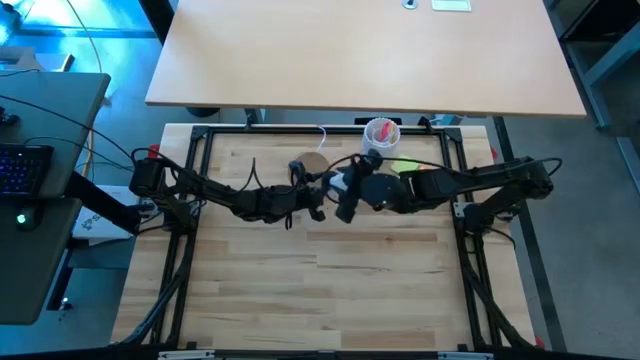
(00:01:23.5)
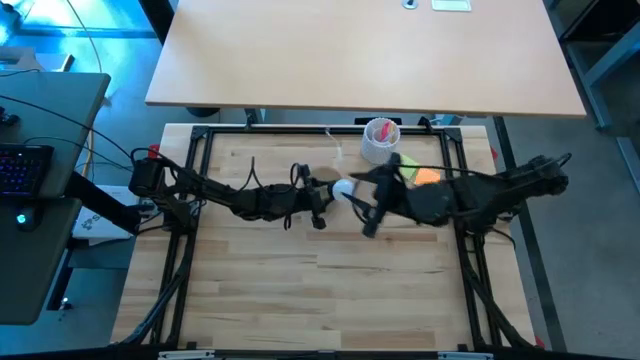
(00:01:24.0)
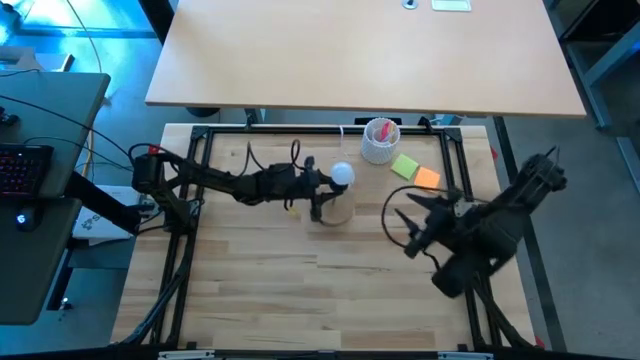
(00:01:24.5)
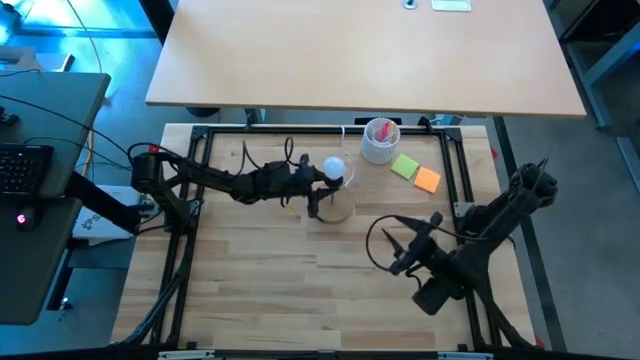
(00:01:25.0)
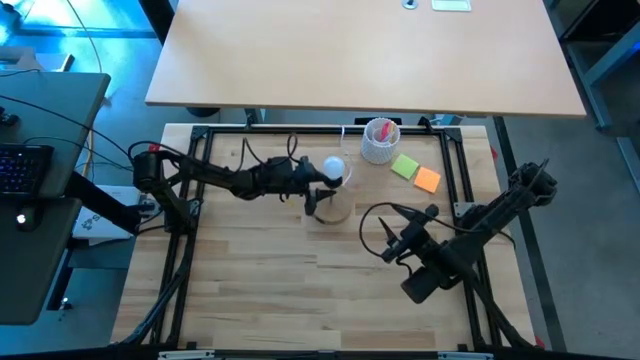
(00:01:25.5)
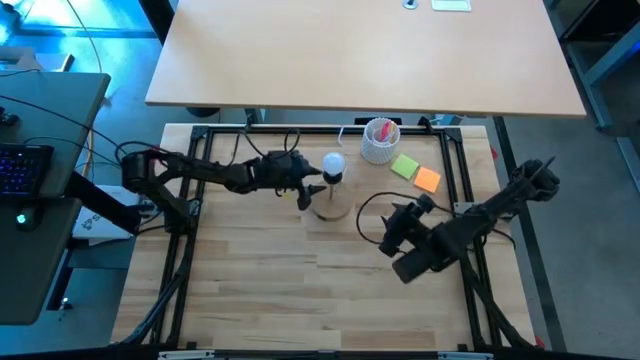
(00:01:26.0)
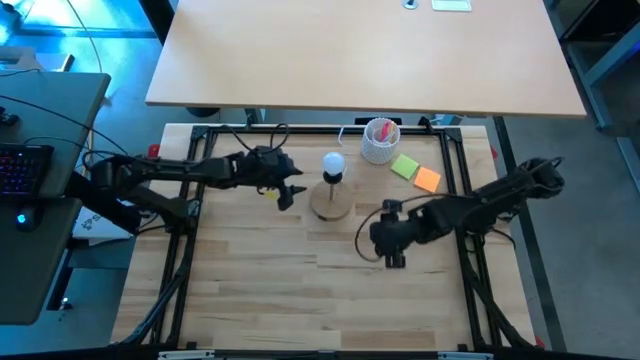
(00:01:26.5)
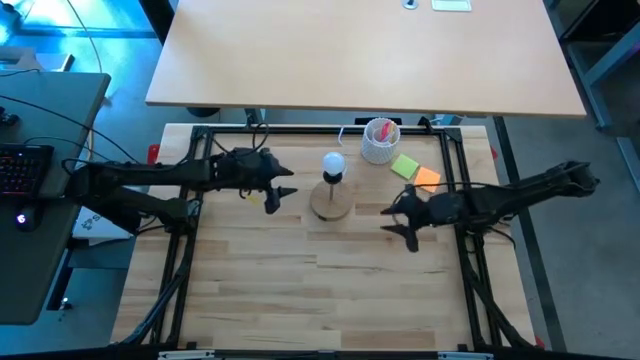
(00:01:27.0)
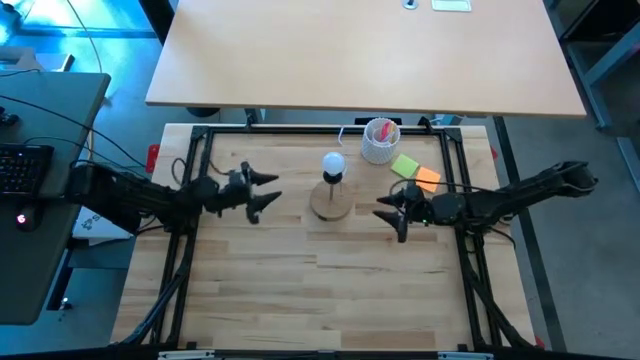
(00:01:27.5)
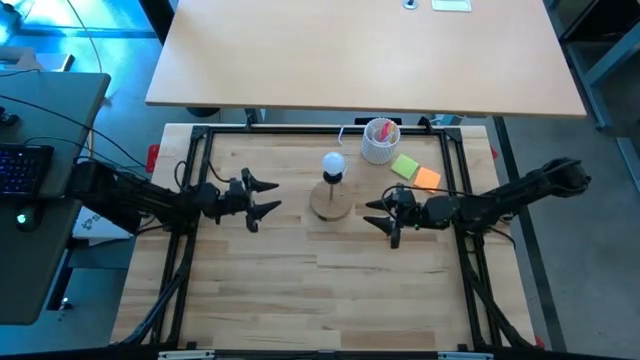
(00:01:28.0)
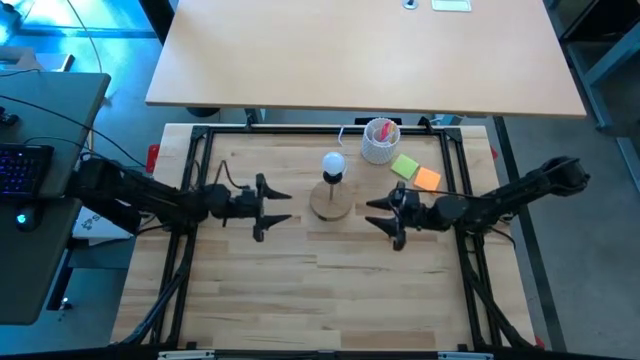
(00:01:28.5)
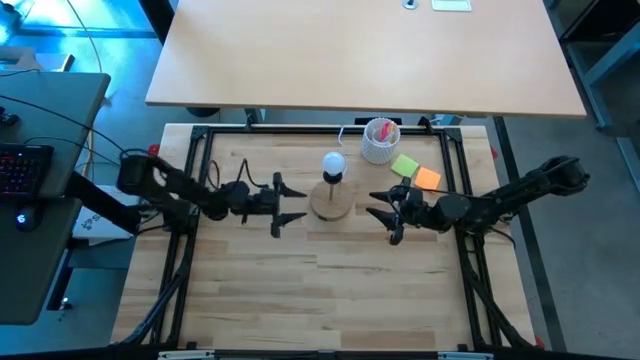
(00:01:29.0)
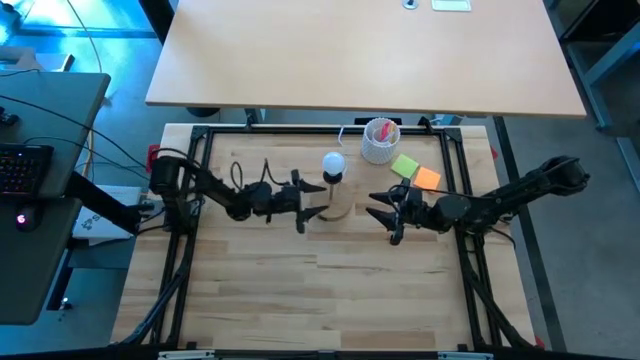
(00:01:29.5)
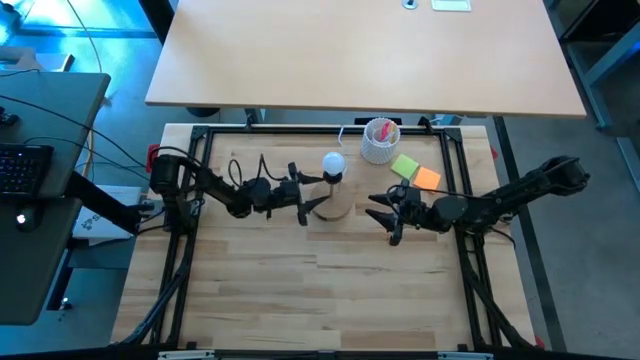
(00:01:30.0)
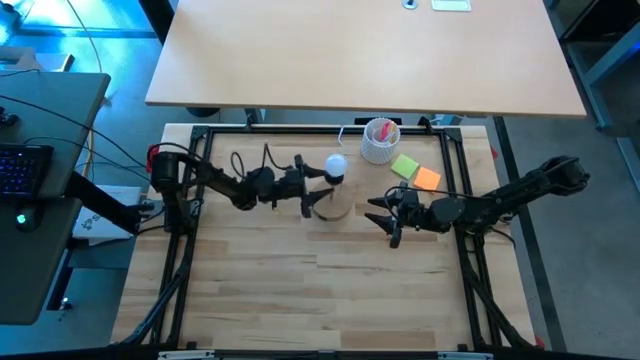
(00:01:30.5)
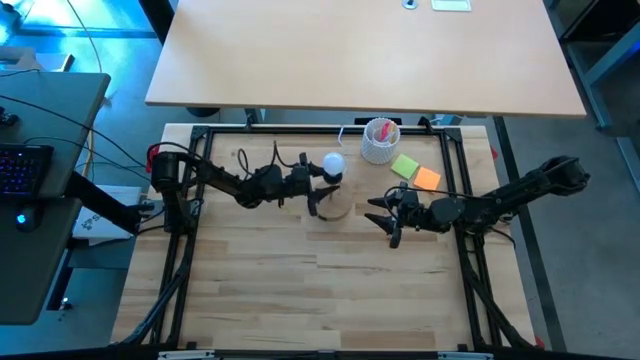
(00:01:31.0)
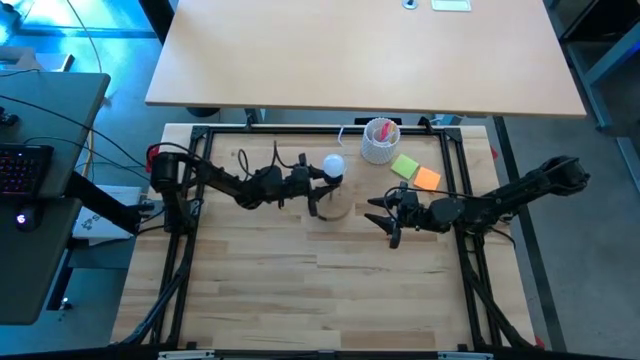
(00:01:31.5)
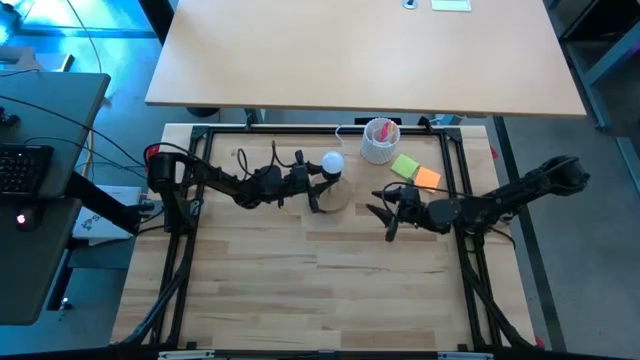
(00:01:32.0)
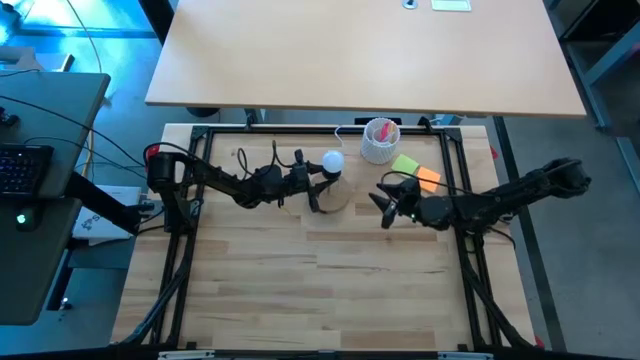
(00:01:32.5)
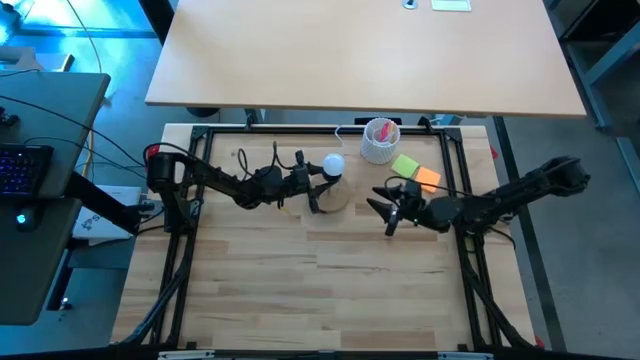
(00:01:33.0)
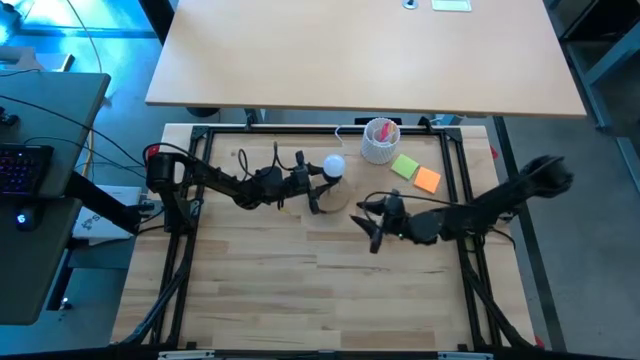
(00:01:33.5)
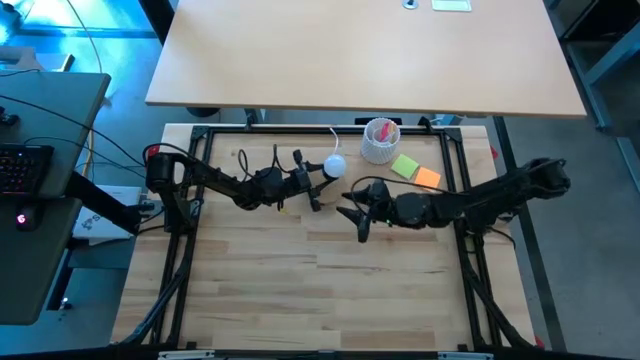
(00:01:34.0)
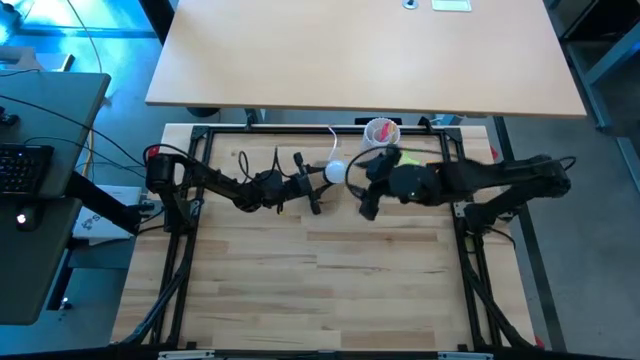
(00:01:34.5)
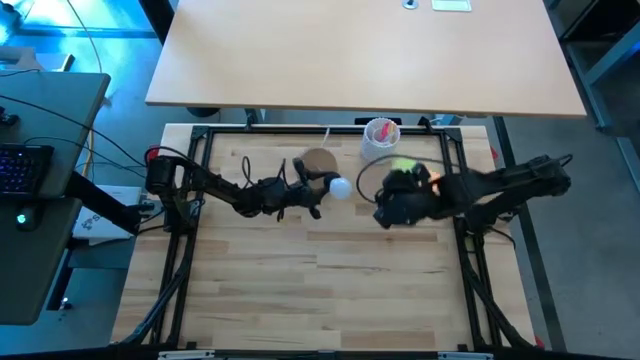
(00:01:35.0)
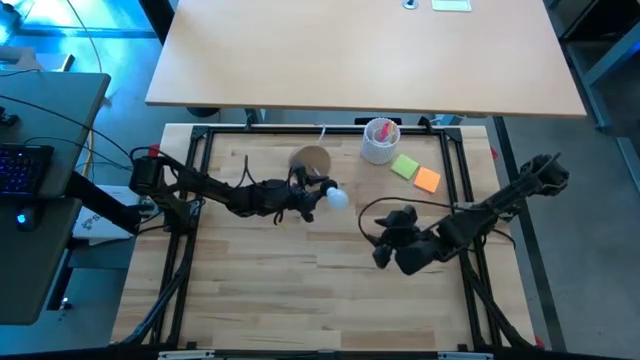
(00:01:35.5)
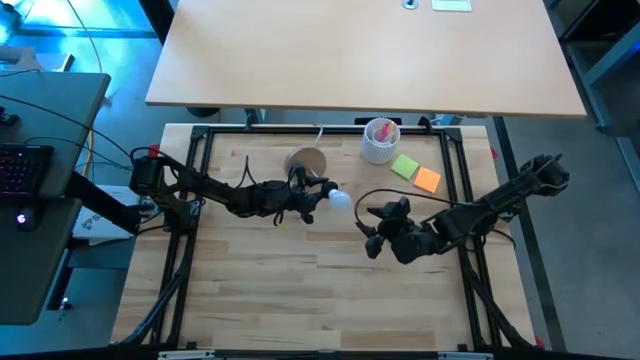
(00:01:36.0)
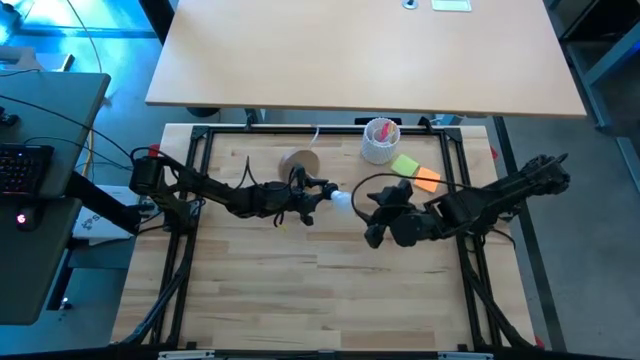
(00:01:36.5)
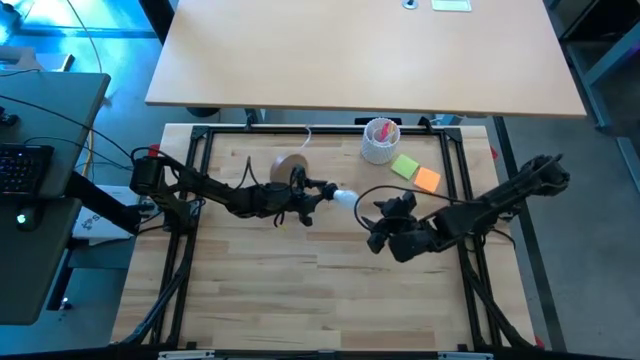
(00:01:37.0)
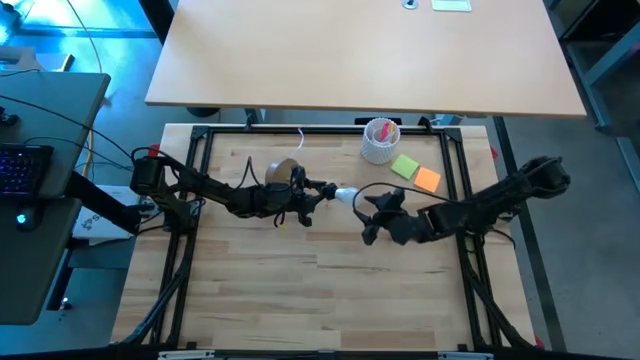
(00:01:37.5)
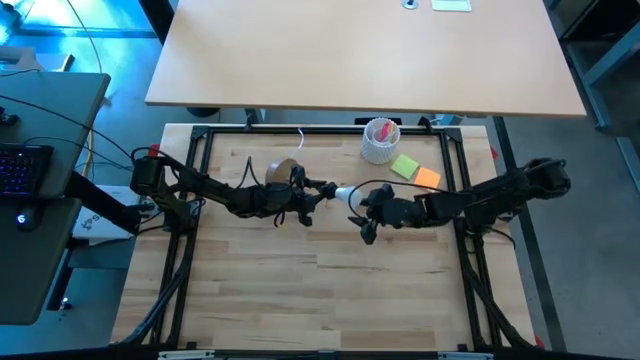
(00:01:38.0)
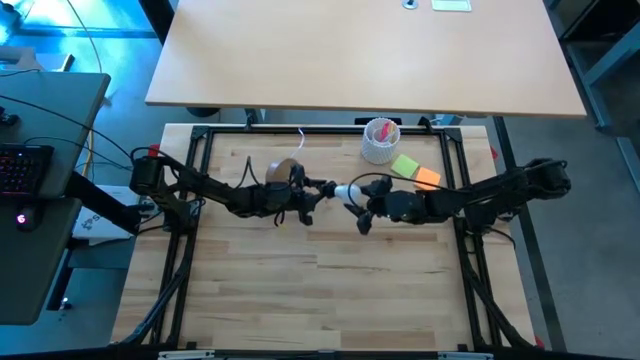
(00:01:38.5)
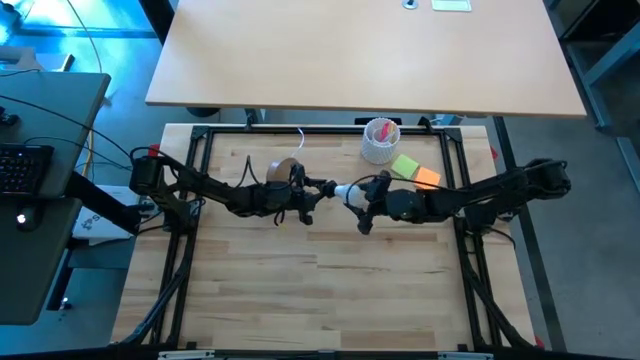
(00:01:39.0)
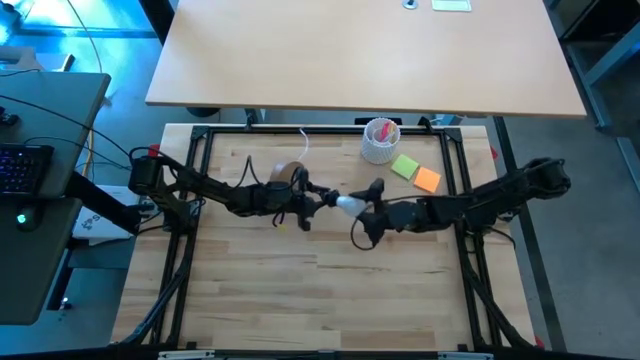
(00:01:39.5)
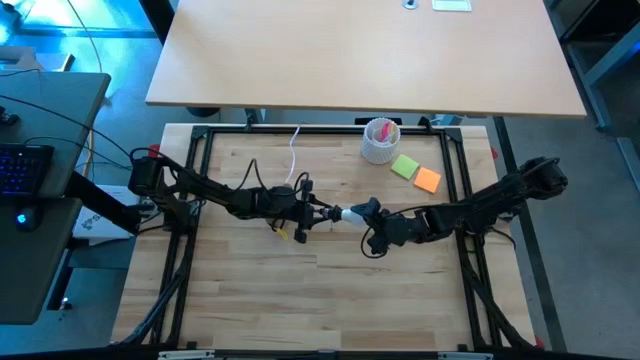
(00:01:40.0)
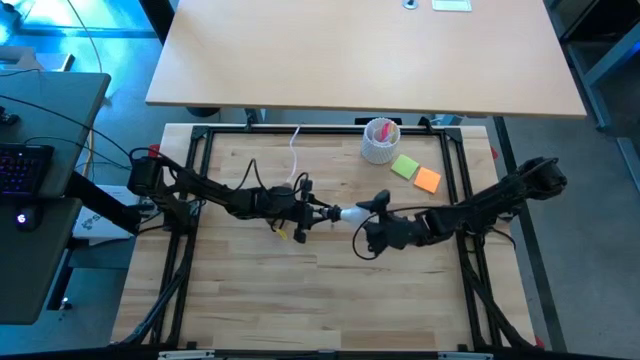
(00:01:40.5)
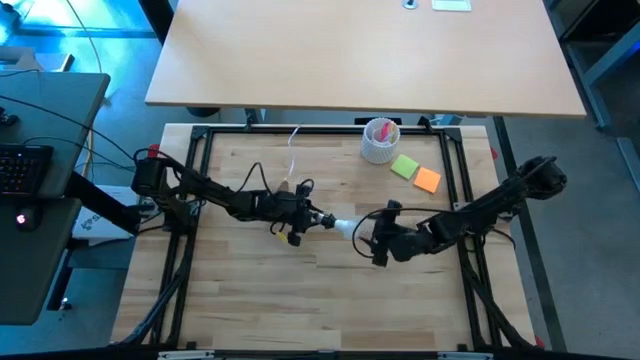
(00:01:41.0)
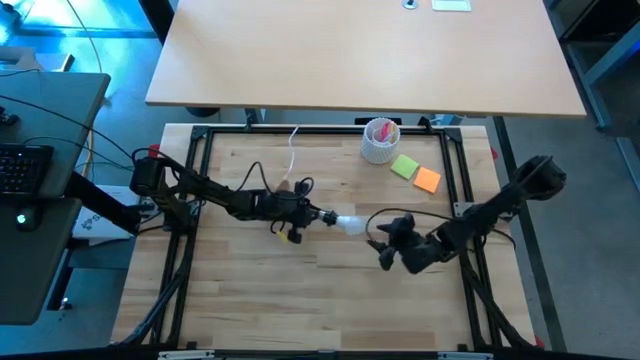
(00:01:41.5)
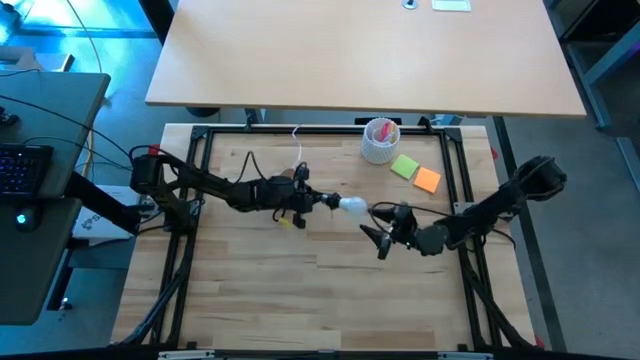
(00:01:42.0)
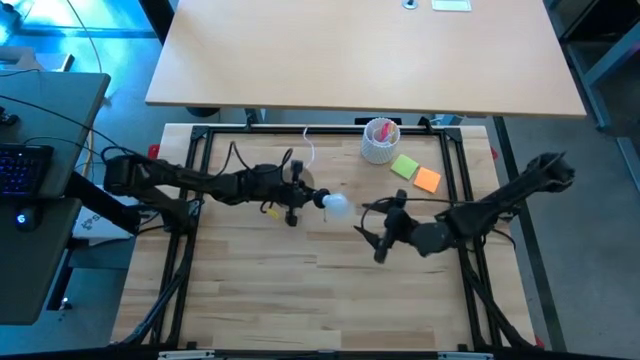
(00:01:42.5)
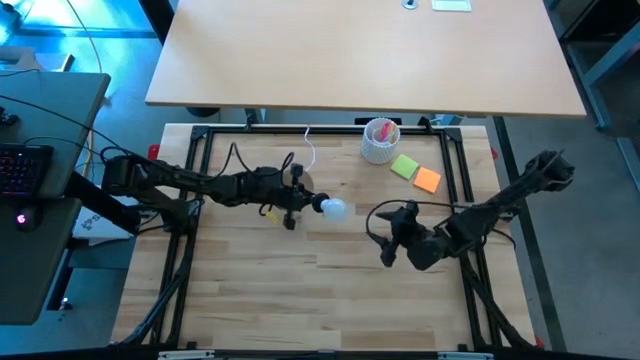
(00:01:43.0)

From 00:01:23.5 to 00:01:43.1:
Task: Screw lightbulb
Remove the lightbulb from the lamp

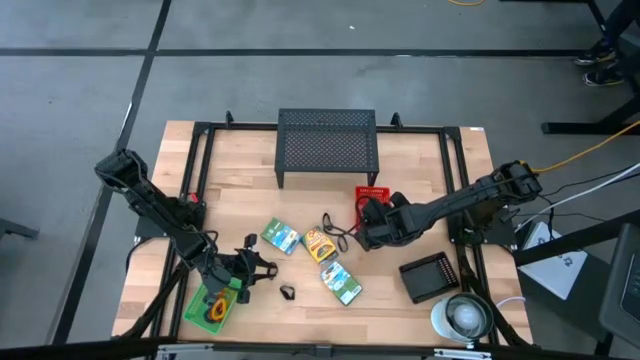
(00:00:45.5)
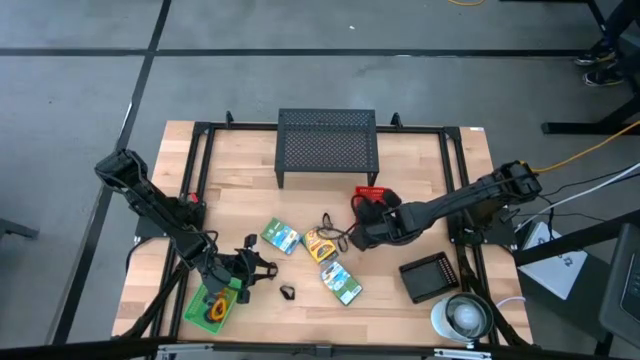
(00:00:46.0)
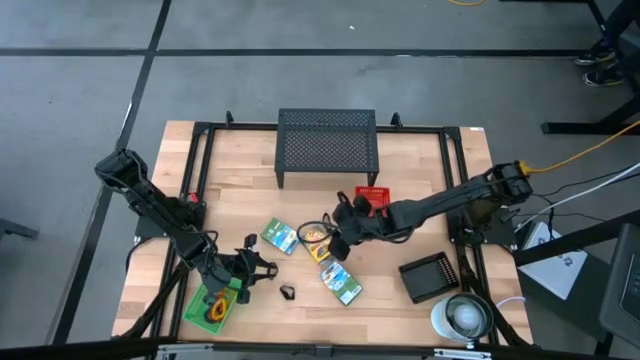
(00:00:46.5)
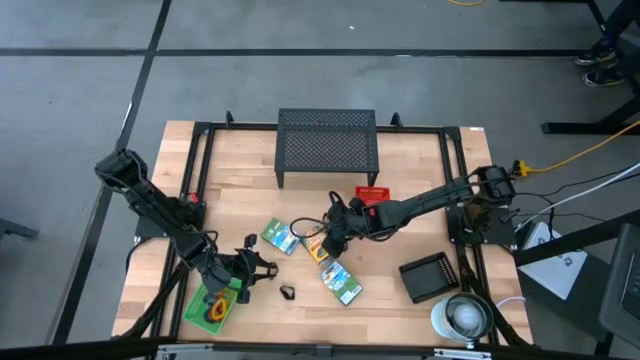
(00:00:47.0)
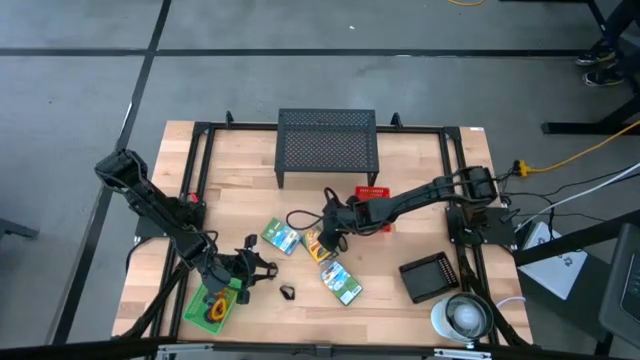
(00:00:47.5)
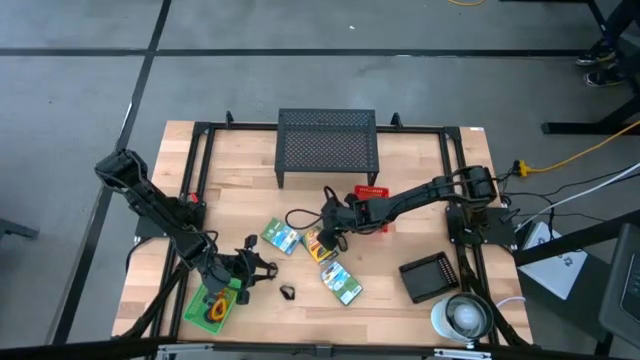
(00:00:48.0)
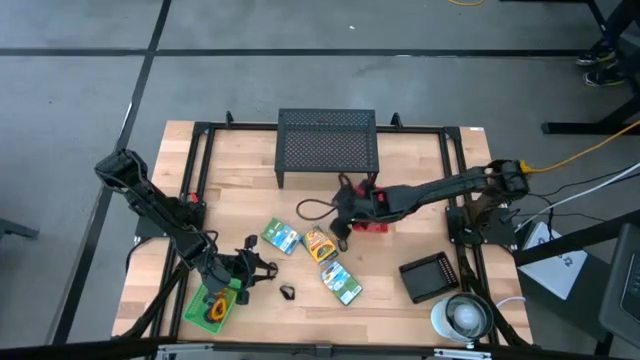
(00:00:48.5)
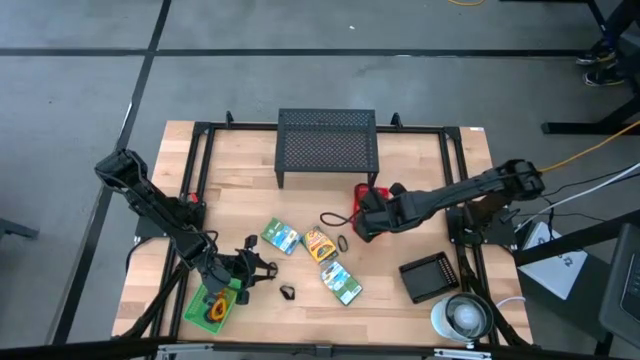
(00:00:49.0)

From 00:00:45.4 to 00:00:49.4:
Task: Pick & Place Office Desk Supplies
Put the black rubberband into the red bin
